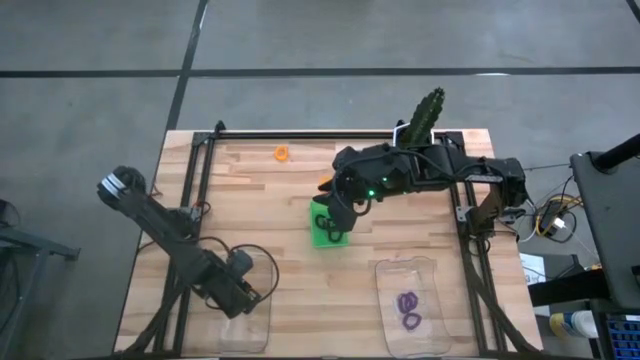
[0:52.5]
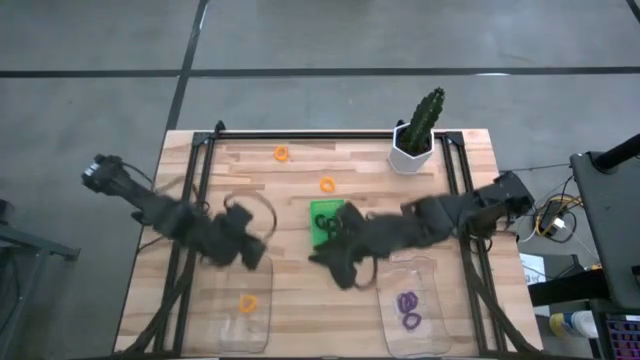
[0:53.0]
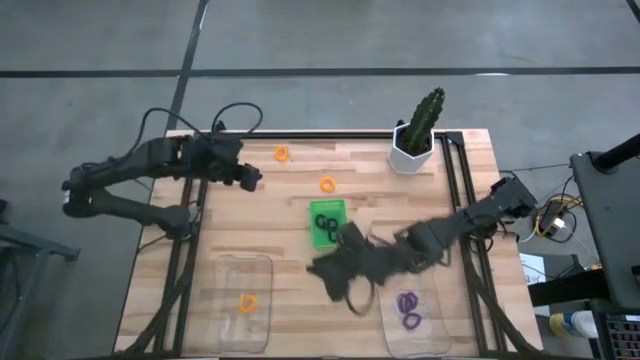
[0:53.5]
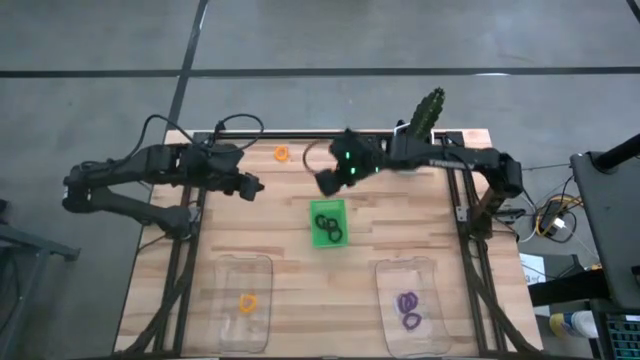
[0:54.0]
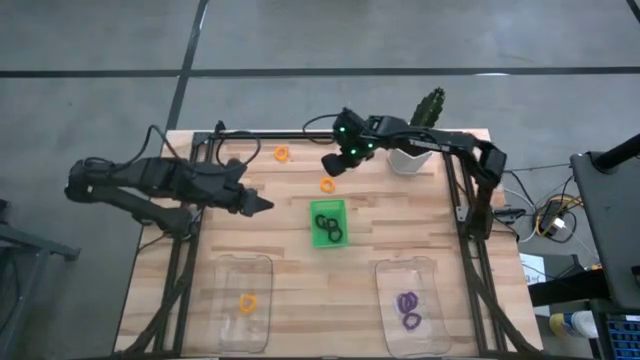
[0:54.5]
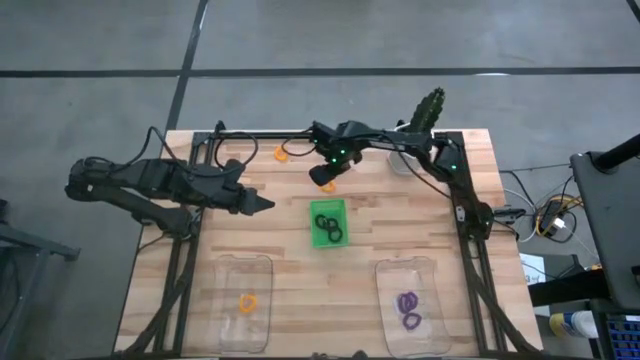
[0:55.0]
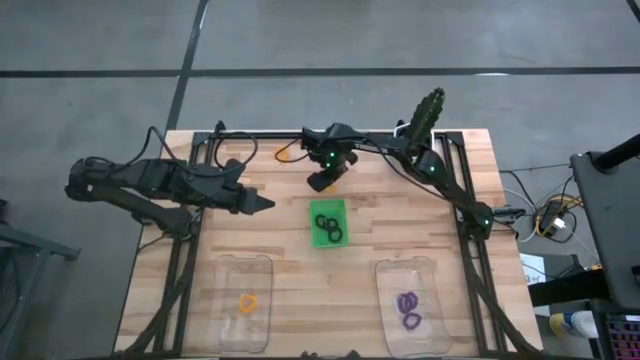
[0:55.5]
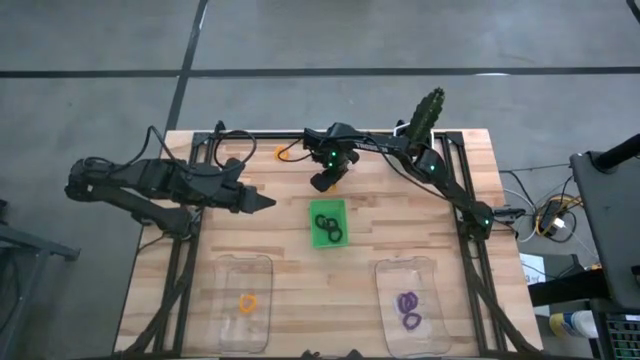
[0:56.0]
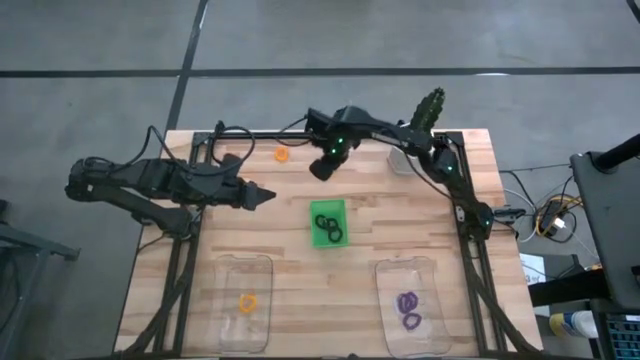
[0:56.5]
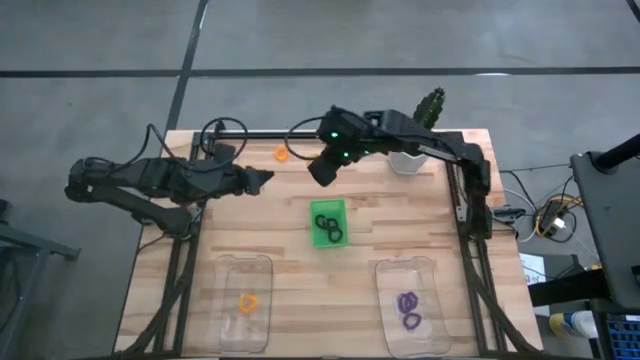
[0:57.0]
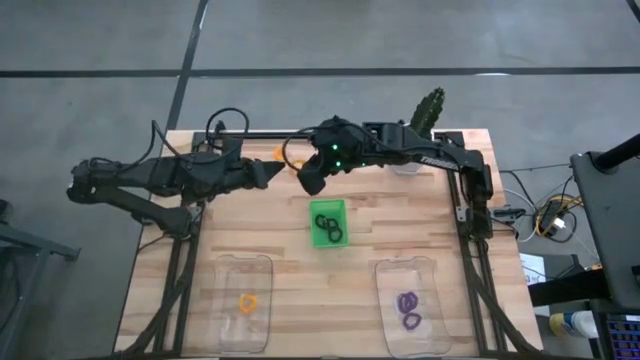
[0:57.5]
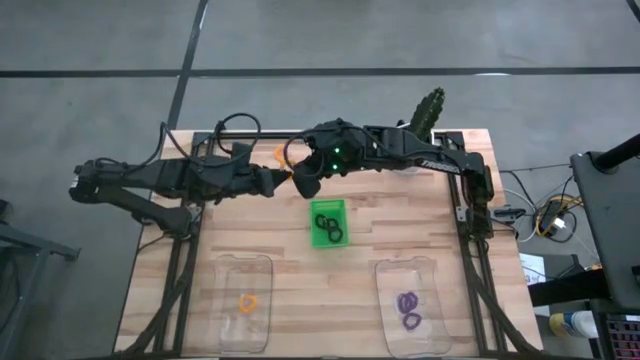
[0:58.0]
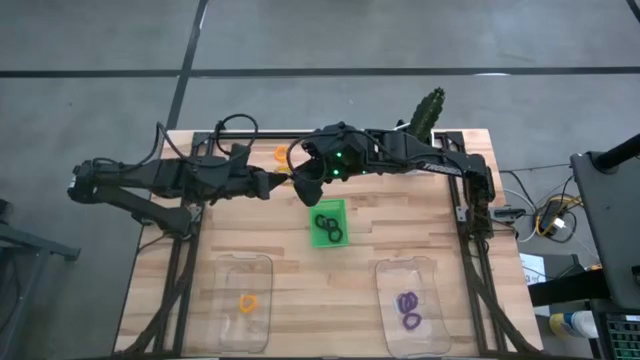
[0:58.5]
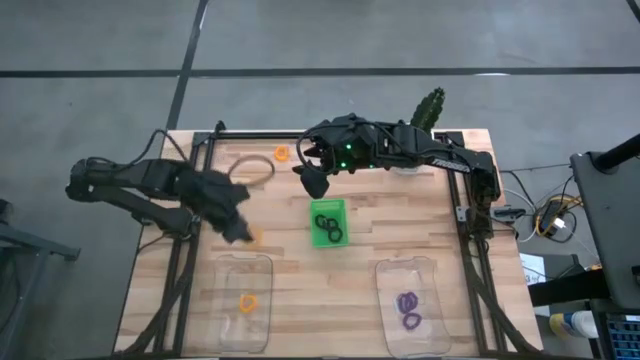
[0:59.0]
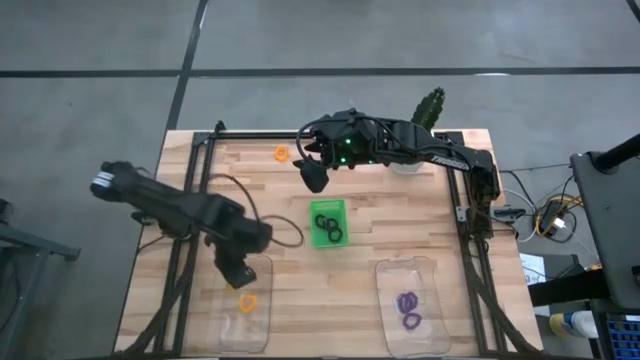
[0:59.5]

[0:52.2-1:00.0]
Task: Sort spring keychains
Put the bottom yellow spring keychain into the left transparent bin

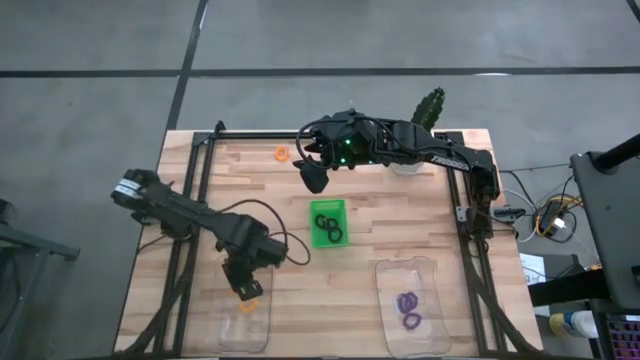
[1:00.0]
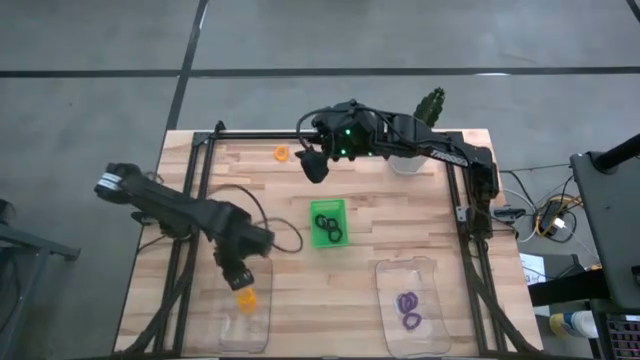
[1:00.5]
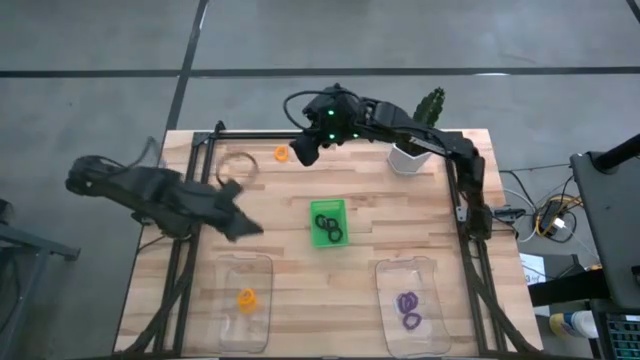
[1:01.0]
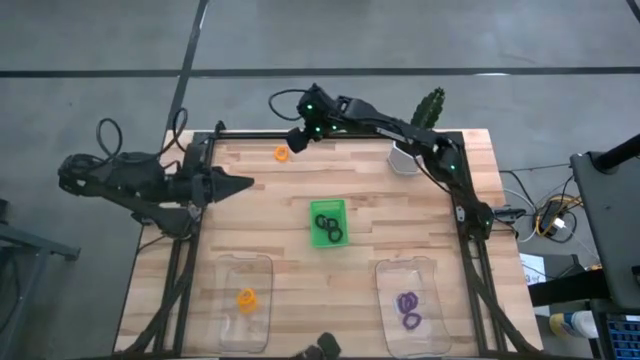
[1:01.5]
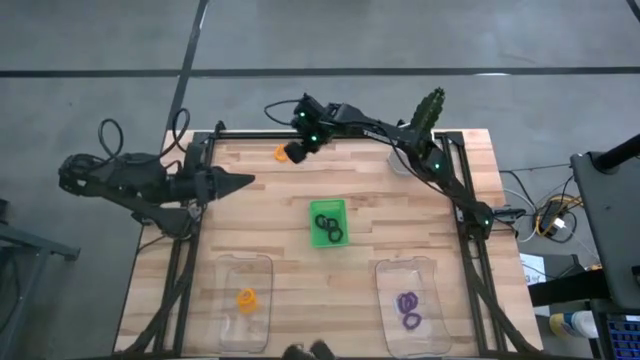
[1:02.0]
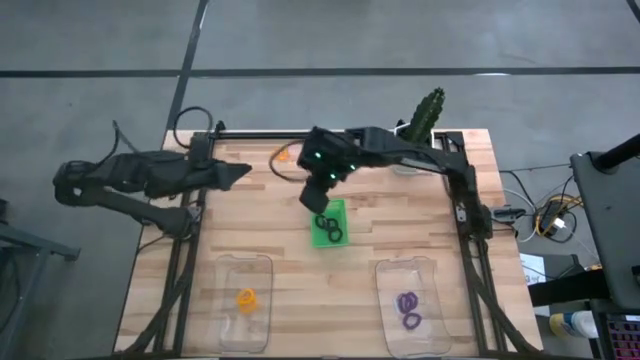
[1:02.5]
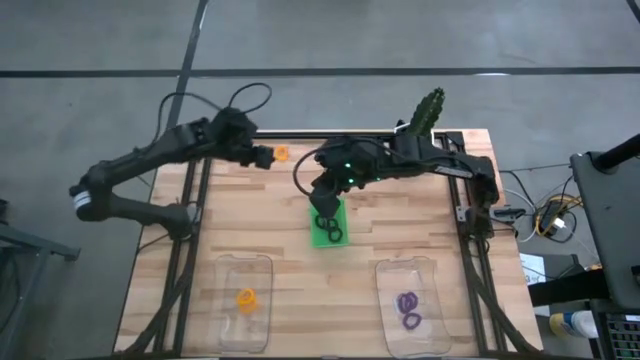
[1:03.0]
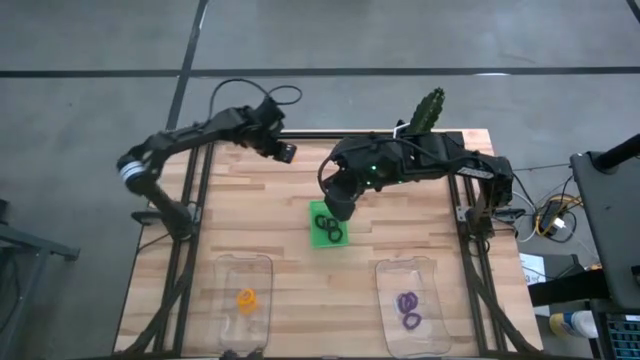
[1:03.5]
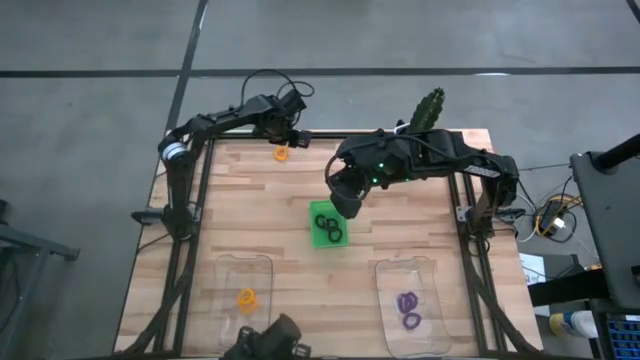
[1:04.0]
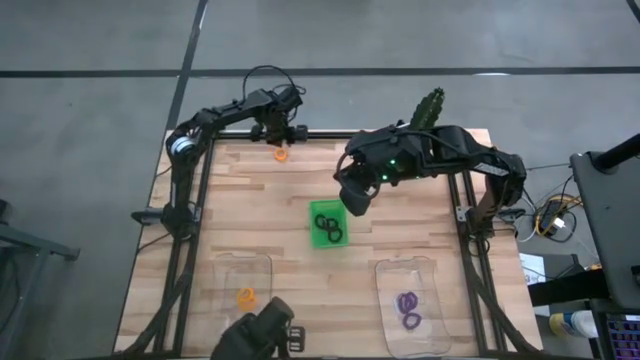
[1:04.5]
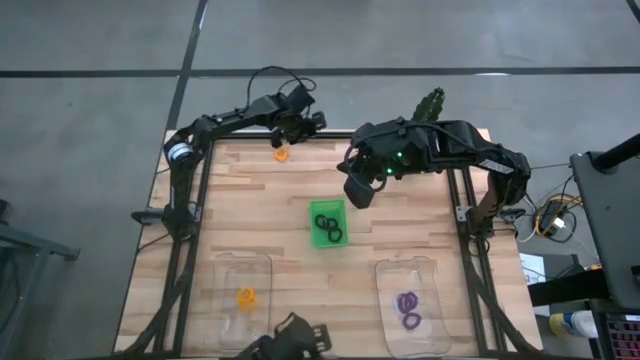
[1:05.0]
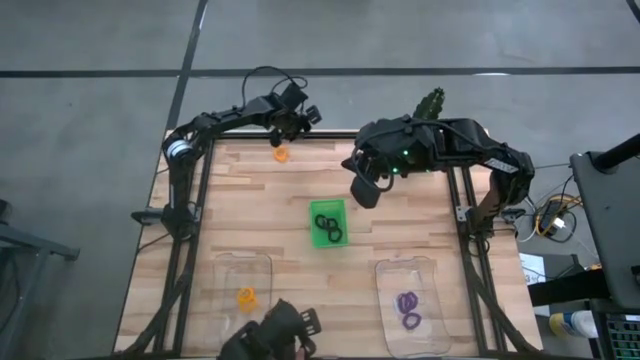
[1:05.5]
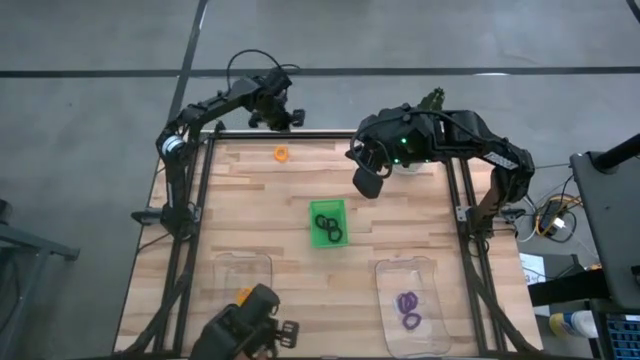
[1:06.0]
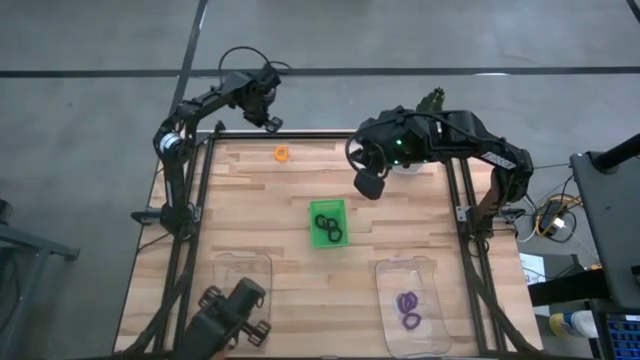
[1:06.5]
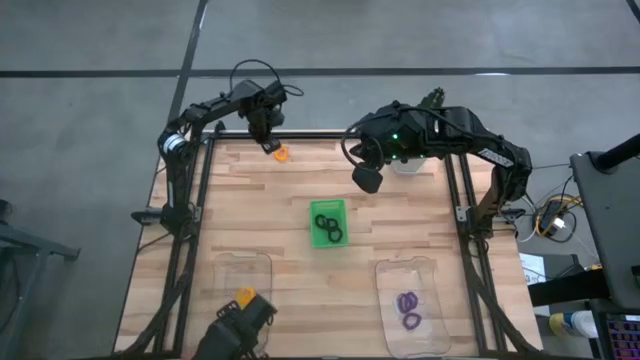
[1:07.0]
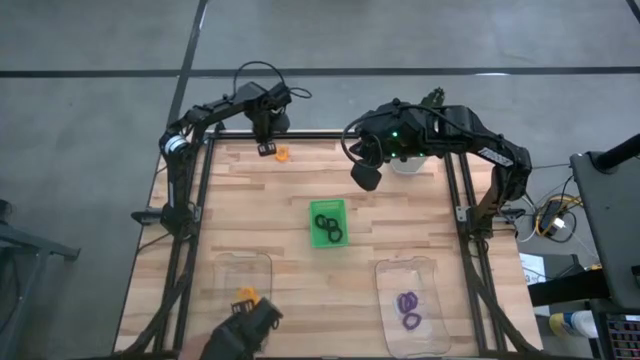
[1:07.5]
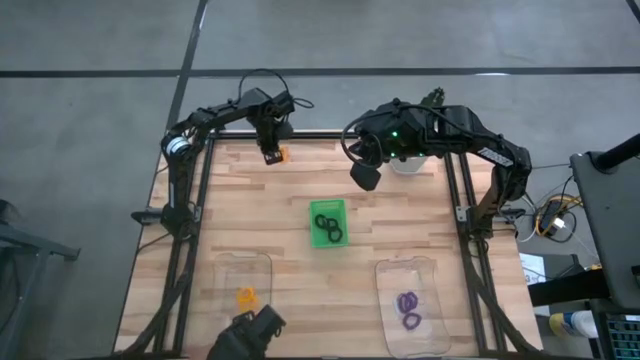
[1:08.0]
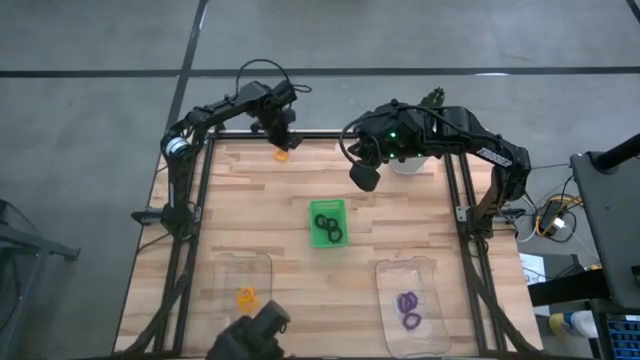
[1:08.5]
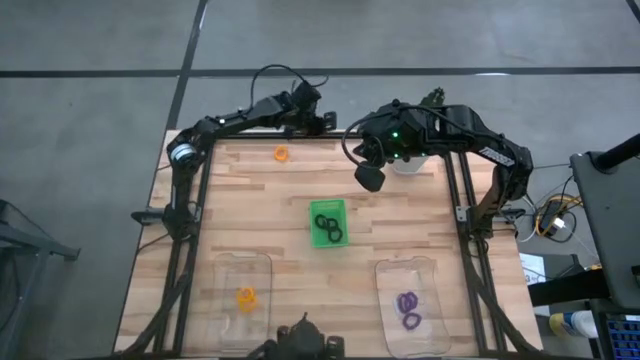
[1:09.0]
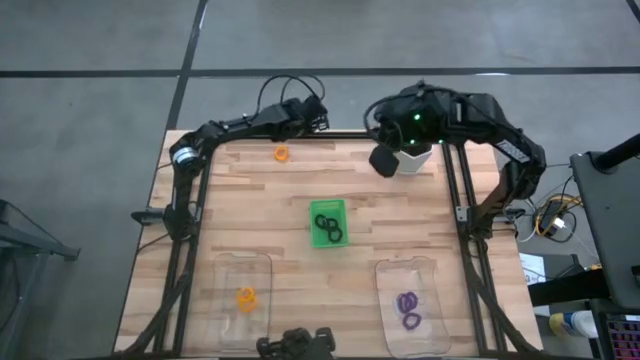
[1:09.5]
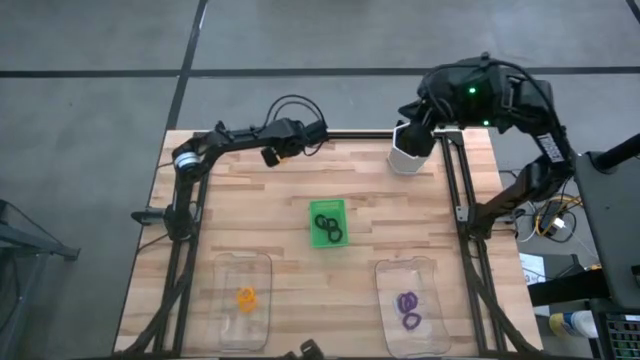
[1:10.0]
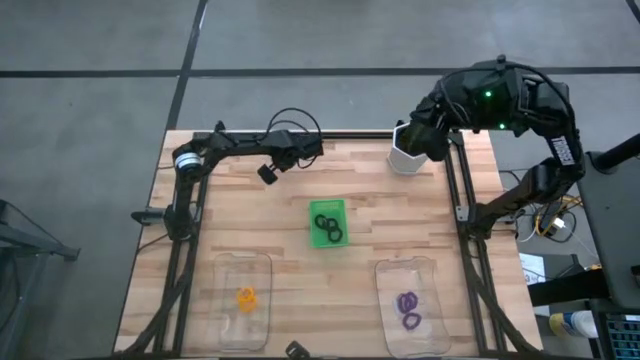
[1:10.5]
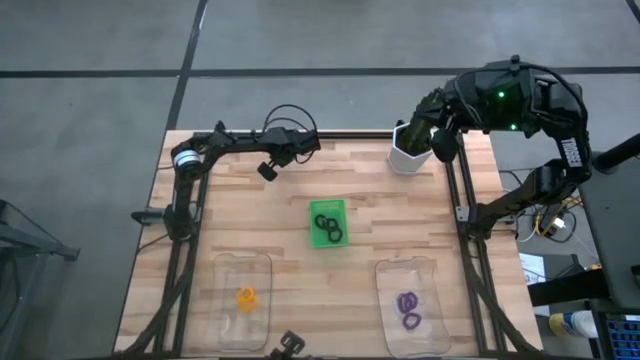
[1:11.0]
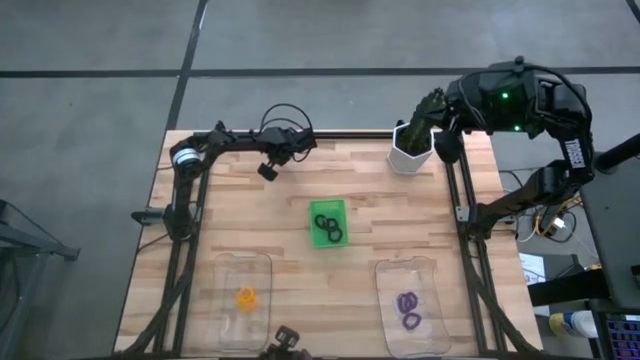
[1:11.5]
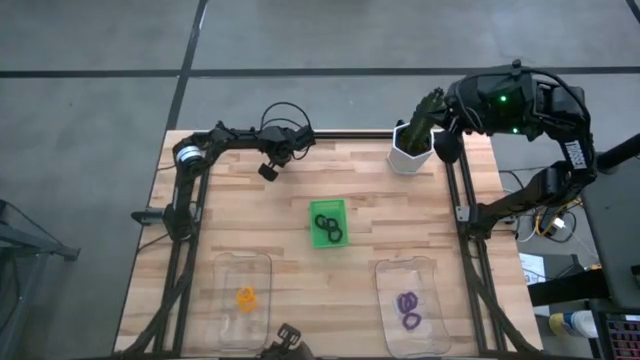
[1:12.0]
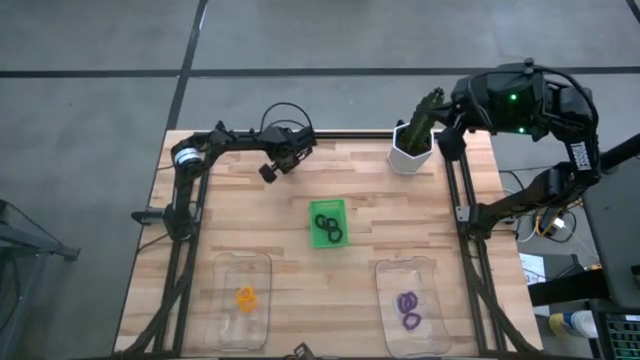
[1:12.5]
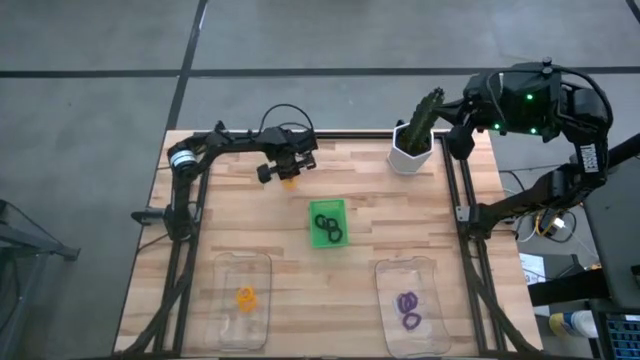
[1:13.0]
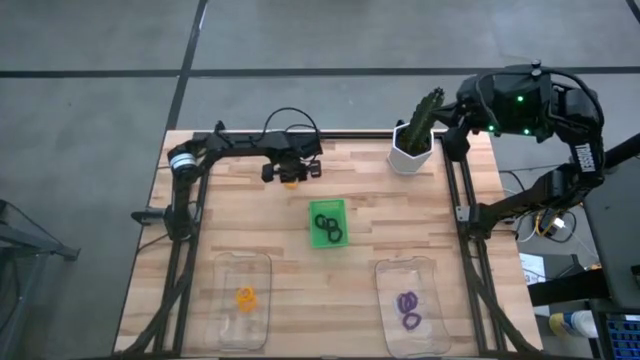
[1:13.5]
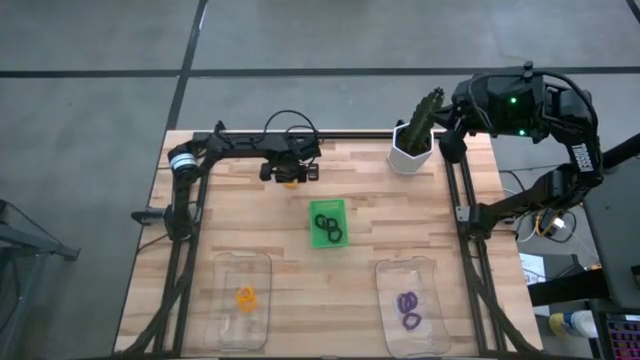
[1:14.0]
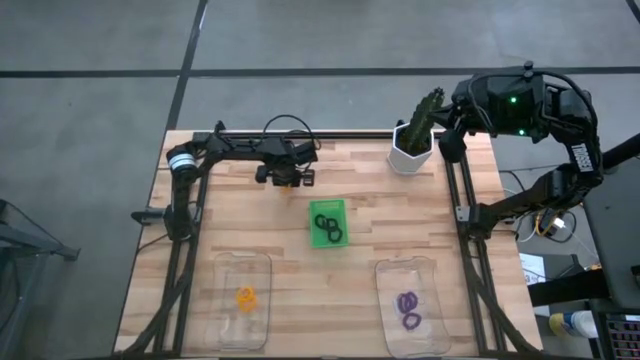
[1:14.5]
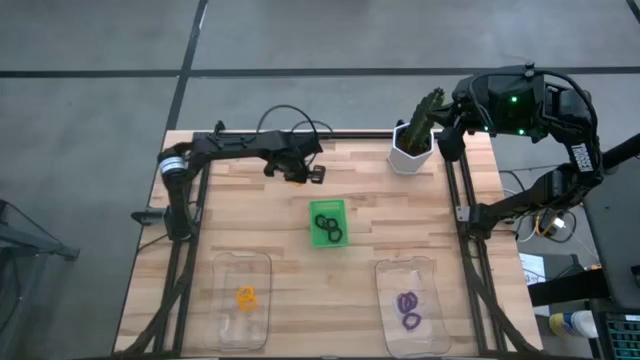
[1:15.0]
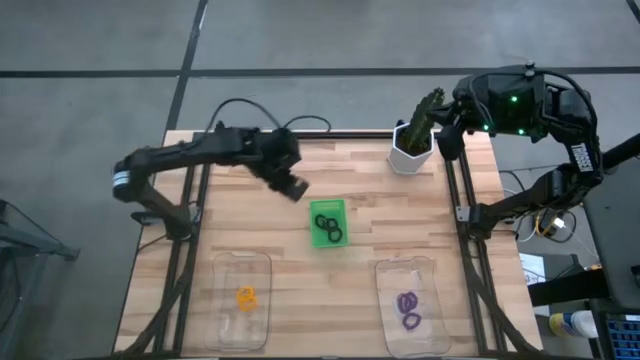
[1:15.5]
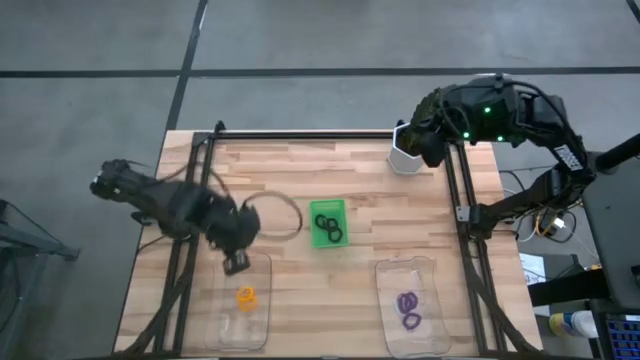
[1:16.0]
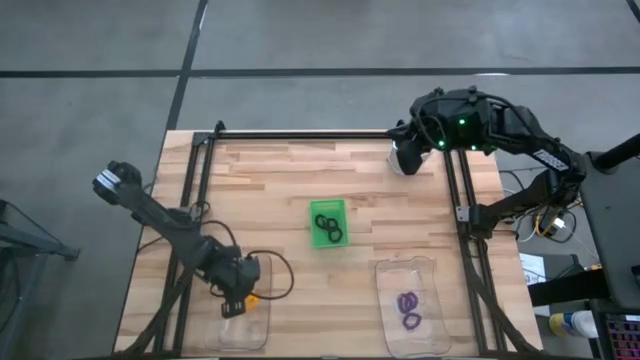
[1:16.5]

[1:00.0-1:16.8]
Put the yellow spring keychain into the left transparent bin
